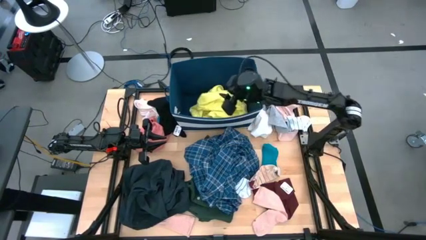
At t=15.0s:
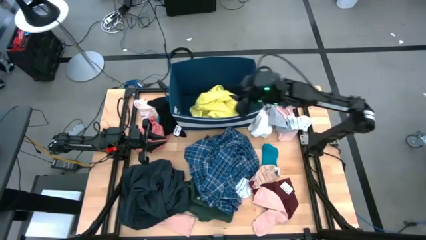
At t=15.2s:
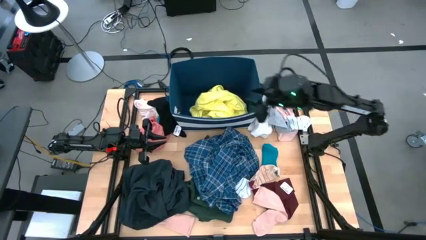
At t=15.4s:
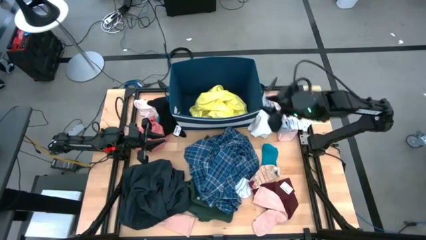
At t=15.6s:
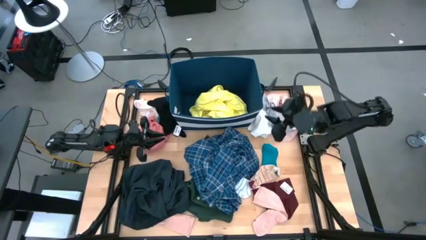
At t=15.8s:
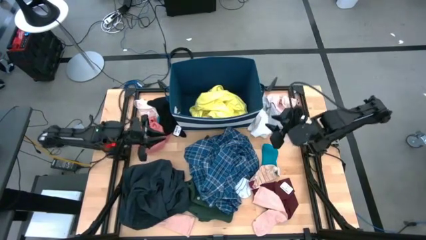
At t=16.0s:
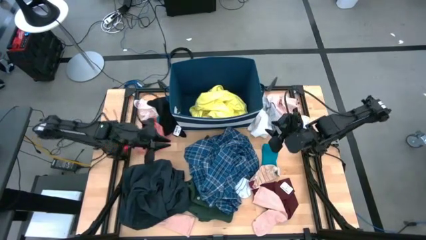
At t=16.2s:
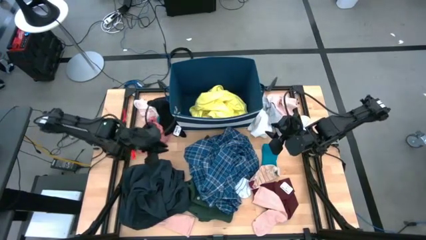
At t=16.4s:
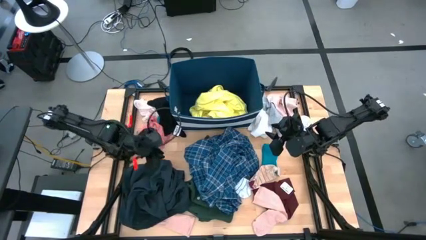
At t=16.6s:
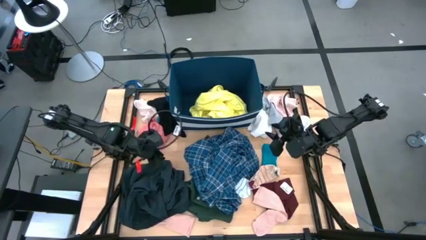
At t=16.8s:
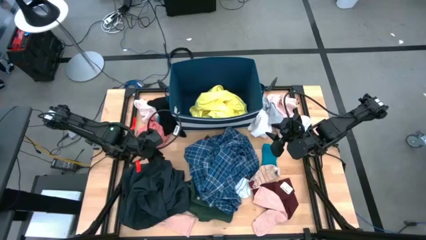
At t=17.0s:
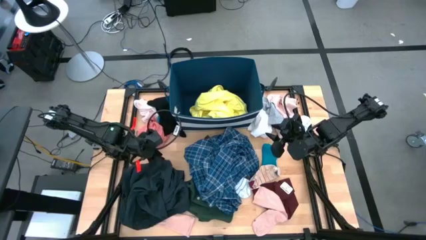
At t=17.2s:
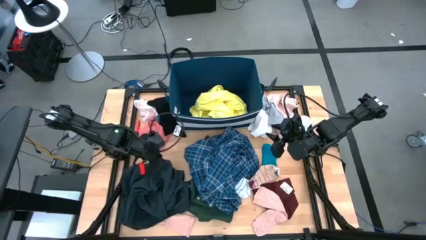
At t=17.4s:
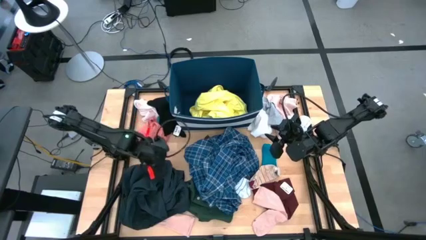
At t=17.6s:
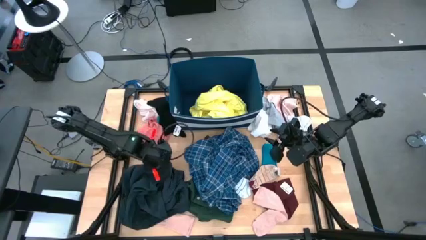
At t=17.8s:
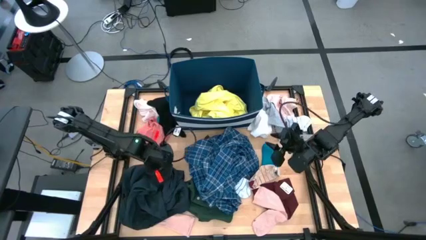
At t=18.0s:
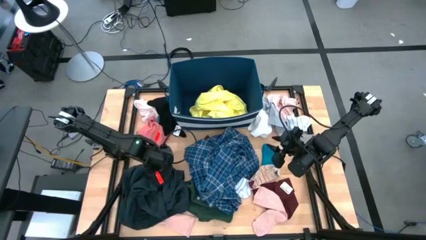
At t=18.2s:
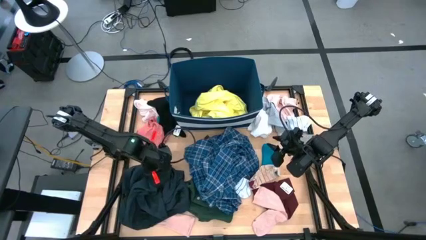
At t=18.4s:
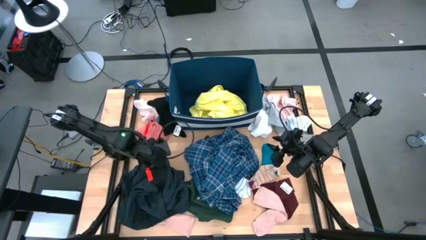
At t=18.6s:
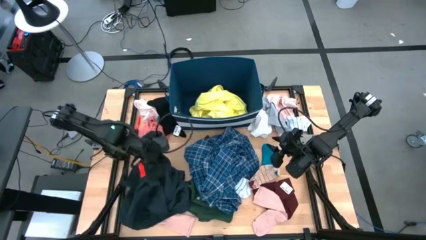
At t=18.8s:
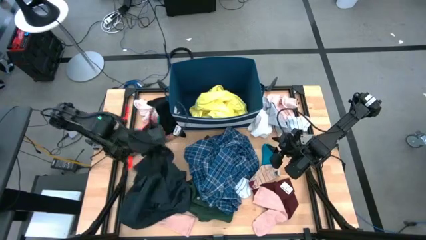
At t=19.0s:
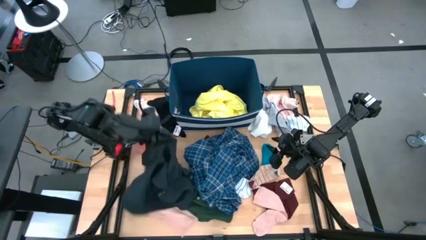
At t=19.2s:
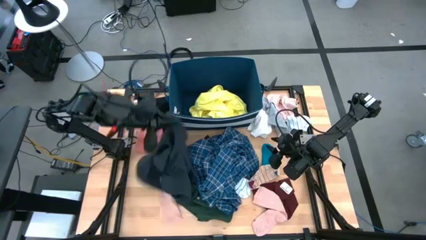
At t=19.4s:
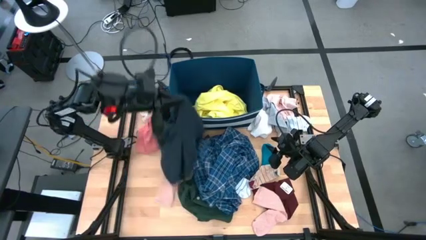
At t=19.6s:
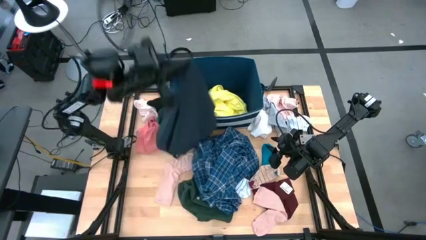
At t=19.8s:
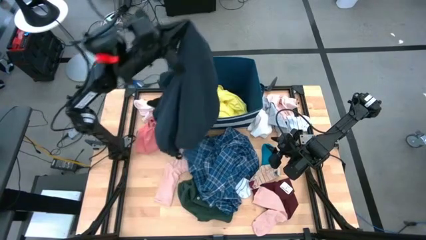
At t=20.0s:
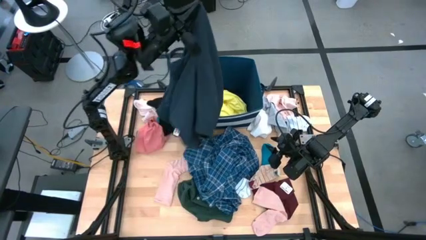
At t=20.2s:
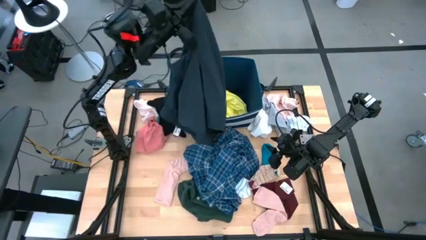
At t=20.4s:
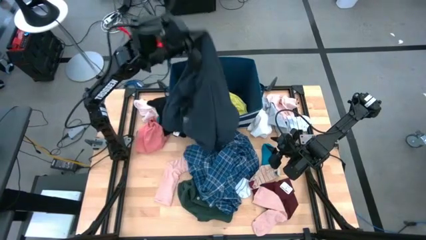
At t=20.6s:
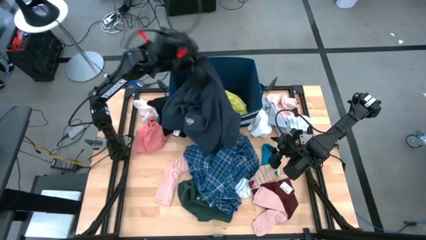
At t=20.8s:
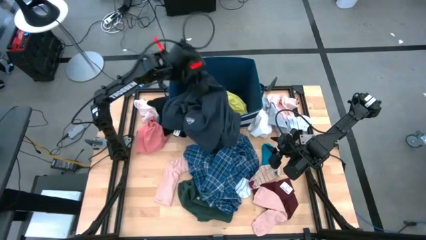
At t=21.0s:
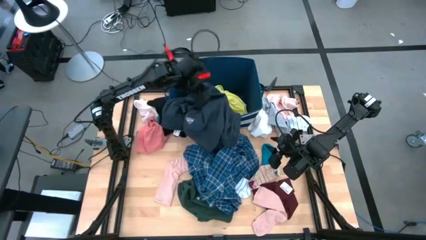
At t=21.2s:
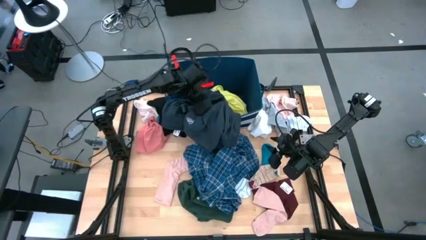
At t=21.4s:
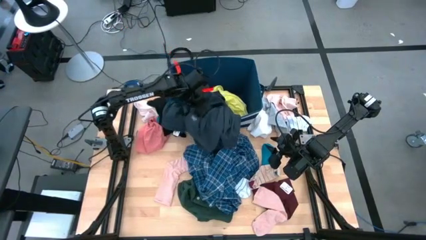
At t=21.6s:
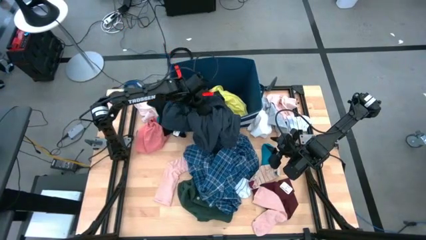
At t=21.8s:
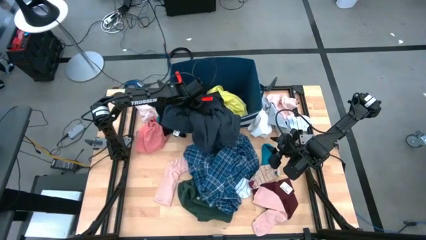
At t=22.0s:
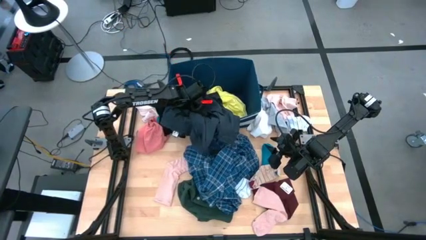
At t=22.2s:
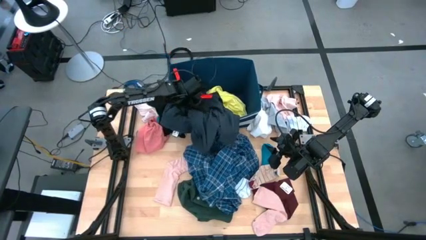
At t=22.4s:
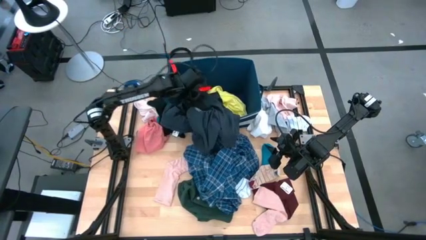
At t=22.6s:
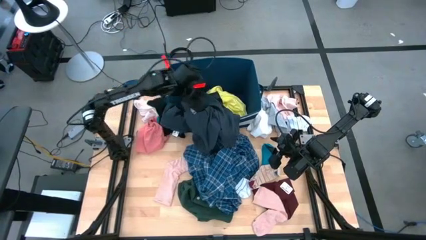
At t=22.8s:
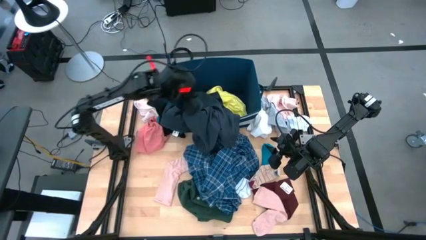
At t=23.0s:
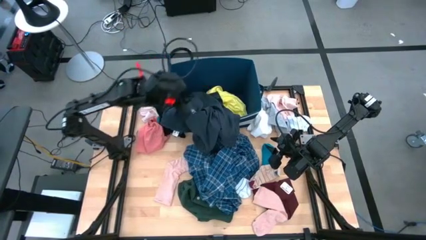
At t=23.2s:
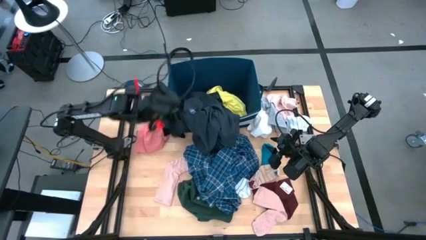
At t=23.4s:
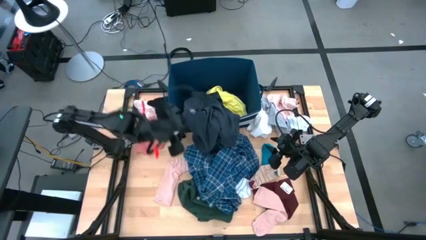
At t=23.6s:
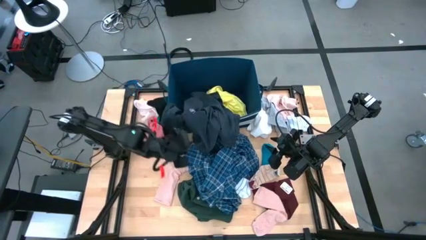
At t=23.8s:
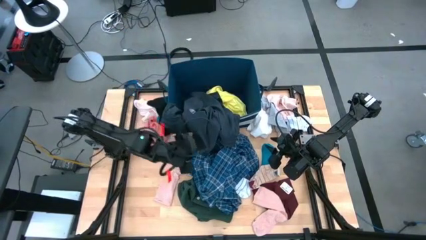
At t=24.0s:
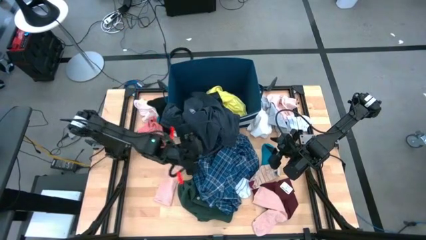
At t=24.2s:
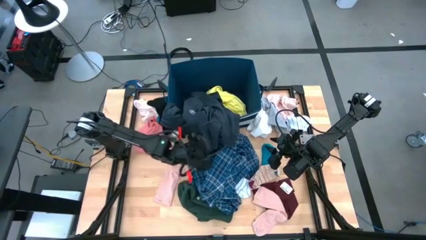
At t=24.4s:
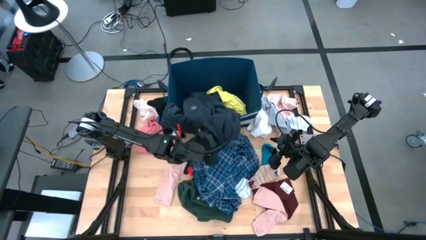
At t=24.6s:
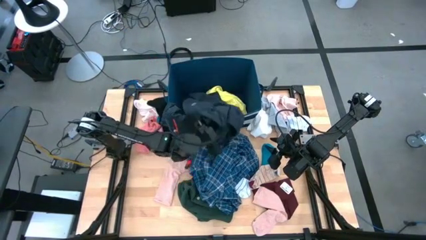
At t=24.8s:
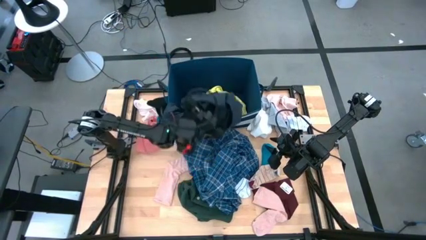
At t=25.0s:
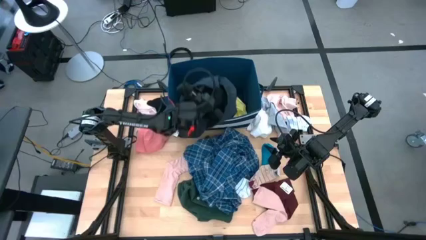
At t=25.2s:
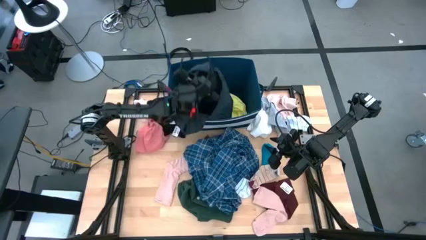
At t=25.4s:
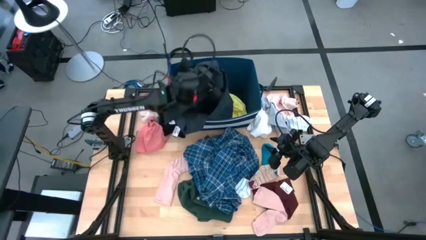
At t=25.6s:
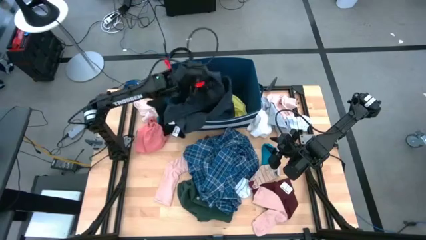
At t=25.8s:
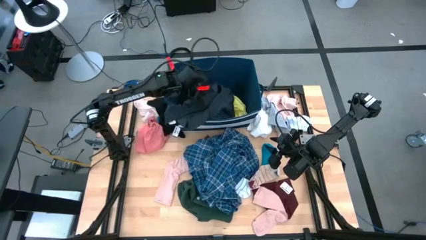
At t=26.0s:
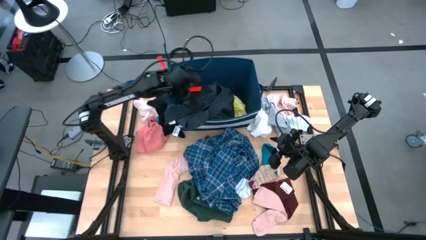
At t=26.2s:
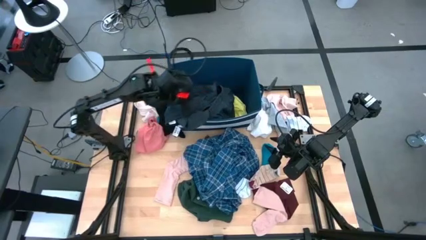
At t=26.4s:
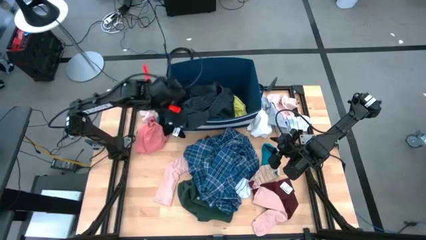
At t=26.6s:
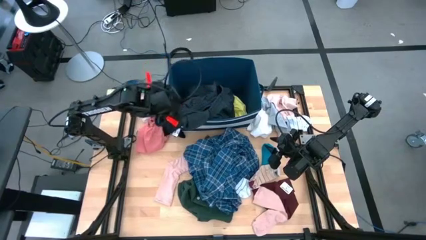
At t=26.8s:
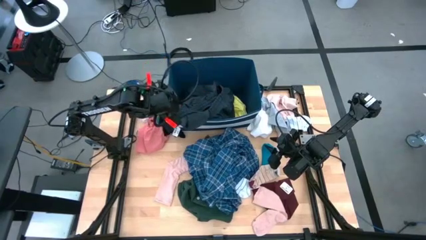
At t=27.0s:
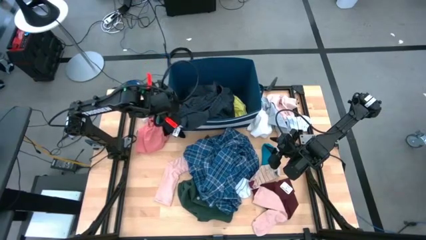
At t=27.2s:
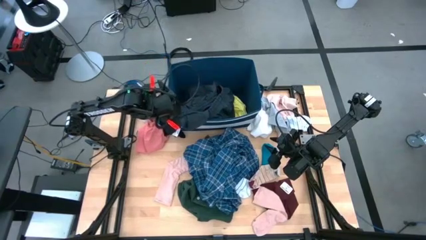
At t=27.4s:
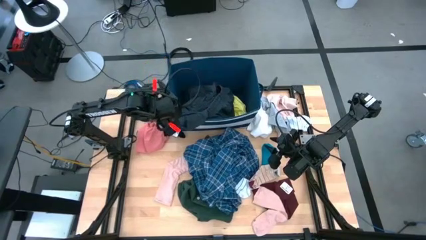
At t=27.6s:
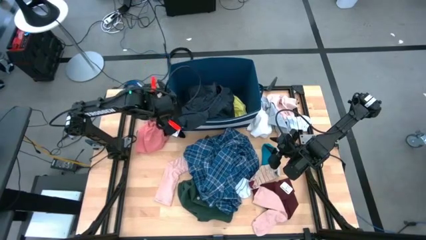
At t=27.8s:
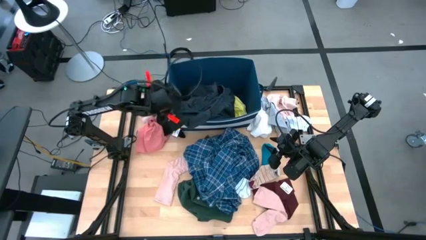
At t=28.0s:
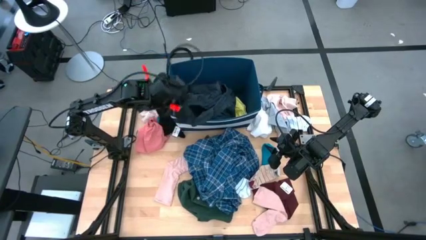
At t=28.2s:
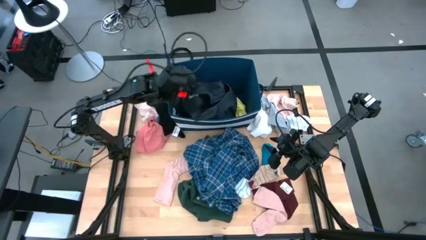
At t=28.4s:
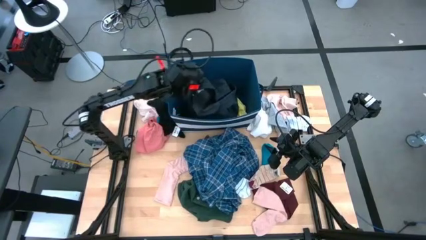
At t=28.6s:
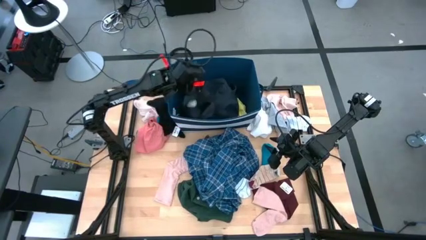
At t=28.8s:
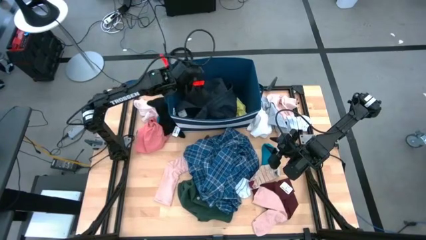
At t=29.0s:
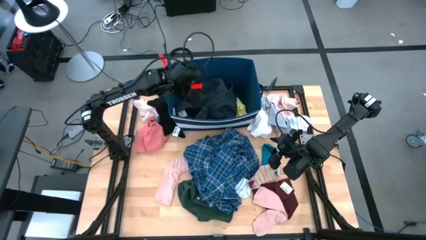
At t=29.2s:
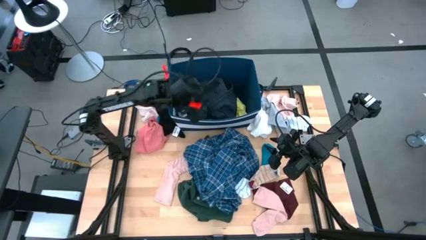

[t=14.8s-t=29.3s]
Task: Sort clothes
Put the dark blue shorts into the blue laundry bin
